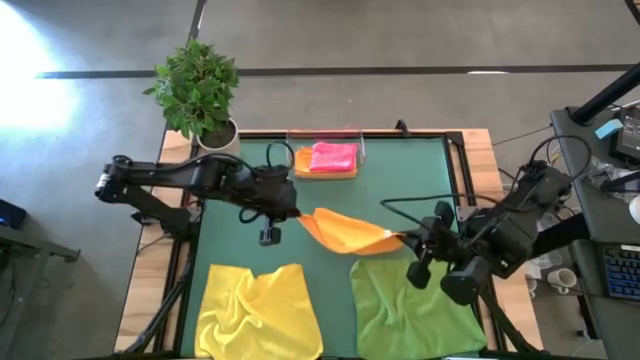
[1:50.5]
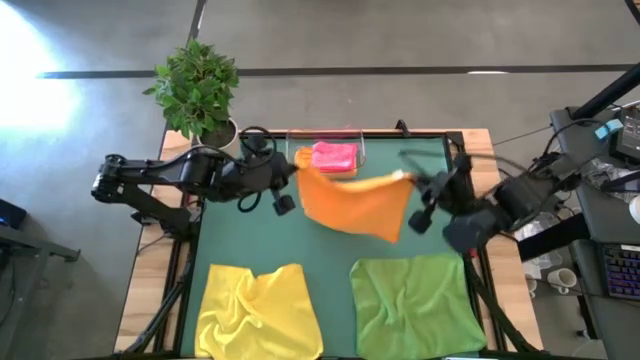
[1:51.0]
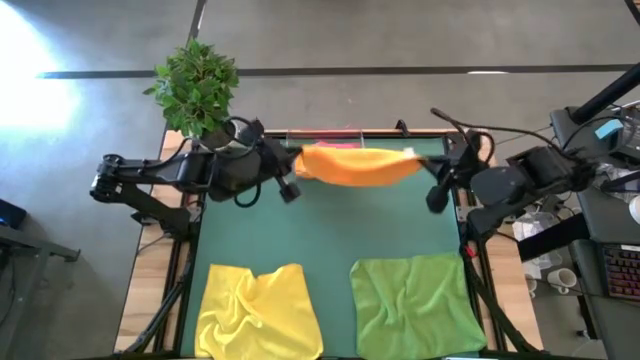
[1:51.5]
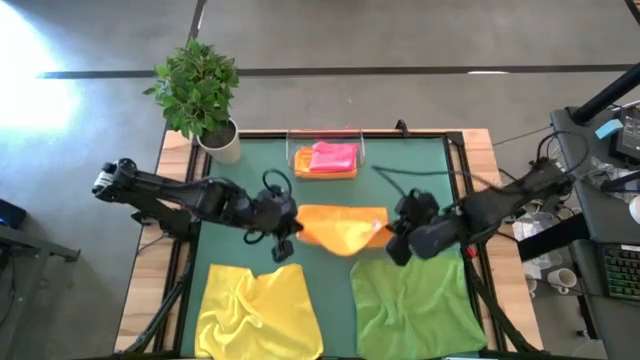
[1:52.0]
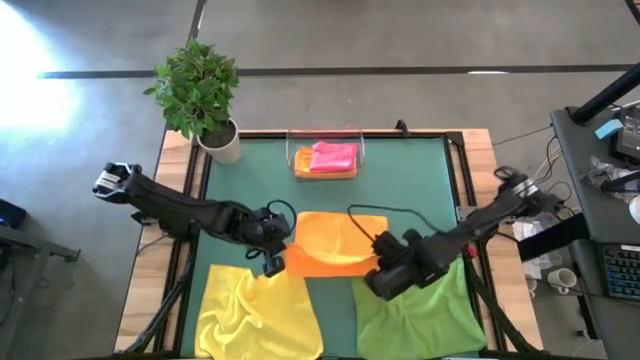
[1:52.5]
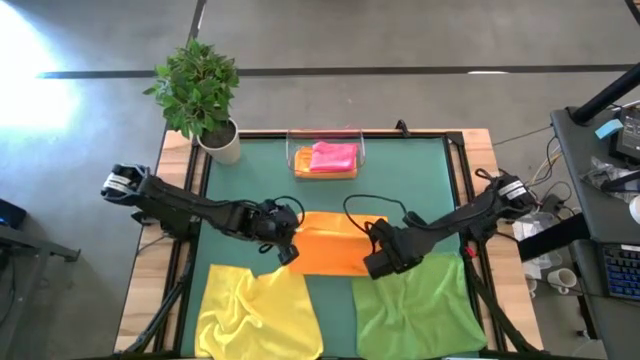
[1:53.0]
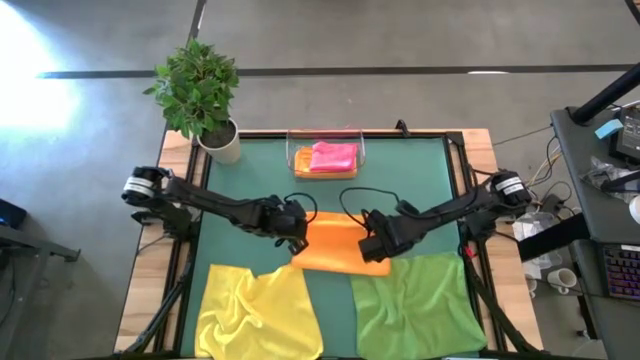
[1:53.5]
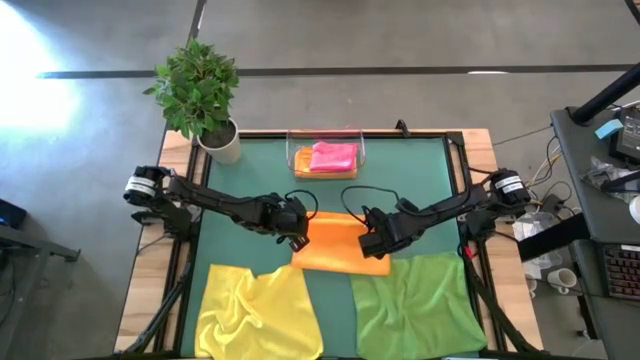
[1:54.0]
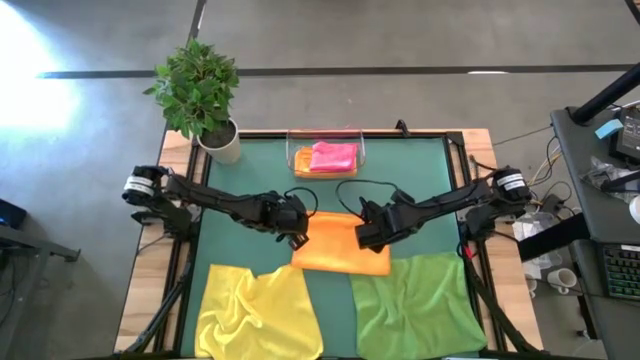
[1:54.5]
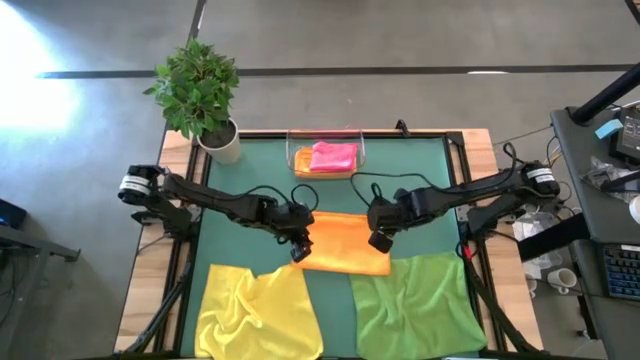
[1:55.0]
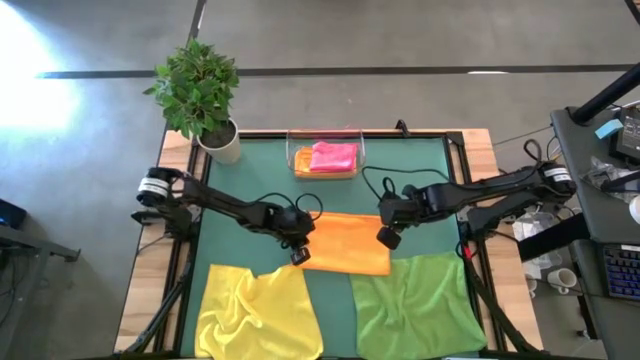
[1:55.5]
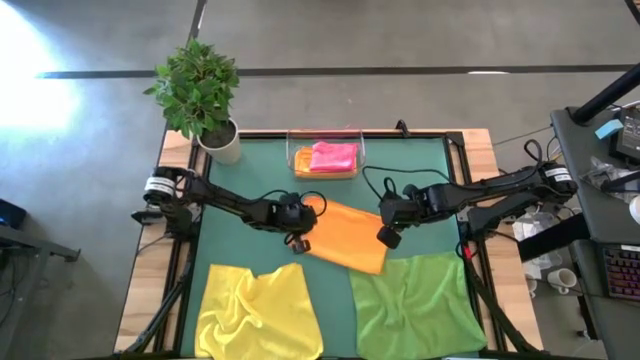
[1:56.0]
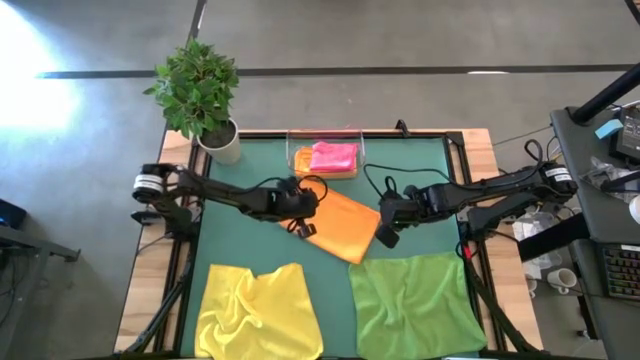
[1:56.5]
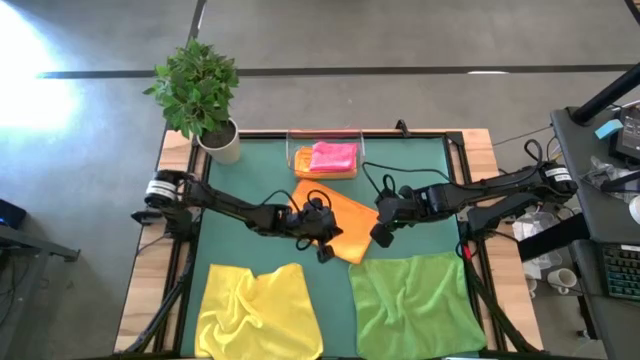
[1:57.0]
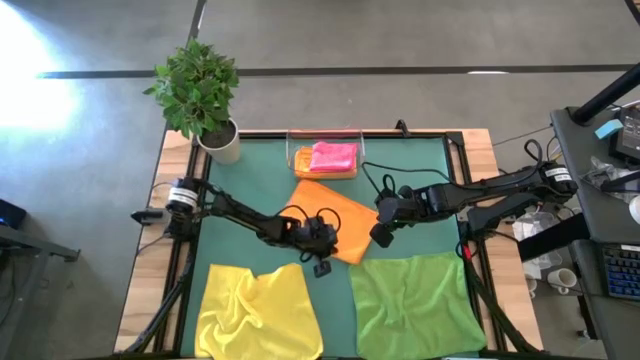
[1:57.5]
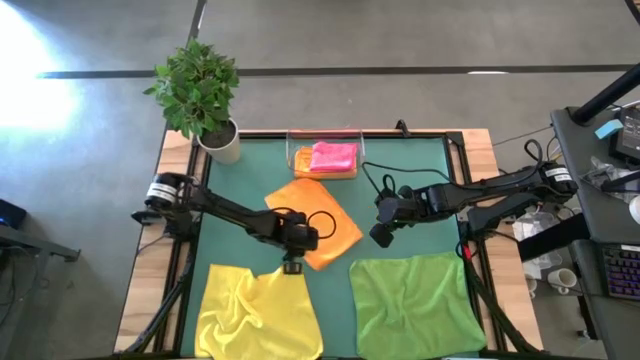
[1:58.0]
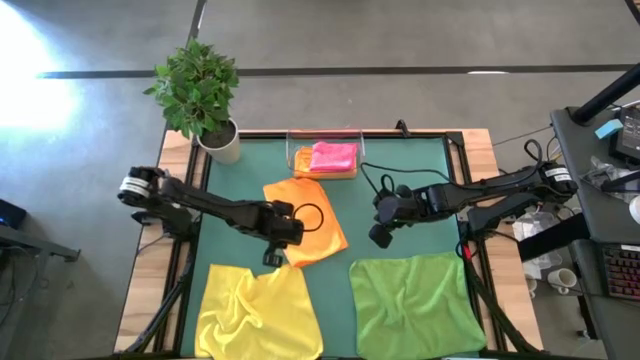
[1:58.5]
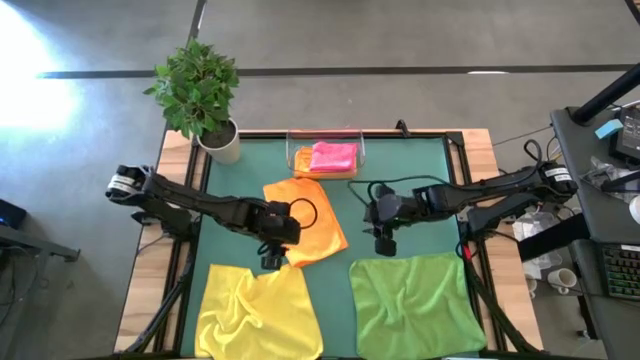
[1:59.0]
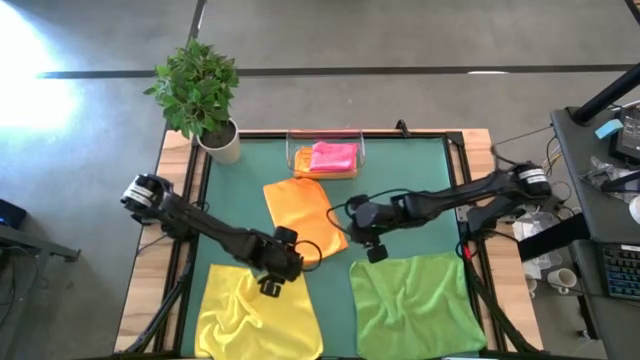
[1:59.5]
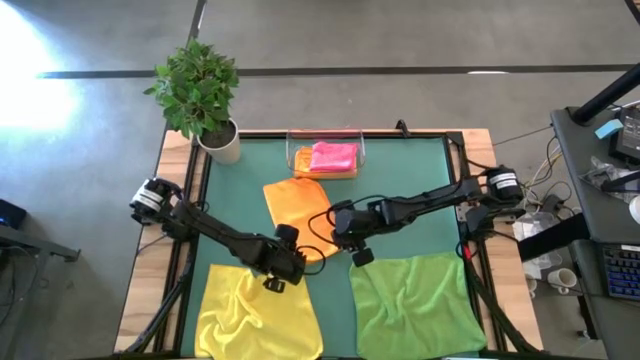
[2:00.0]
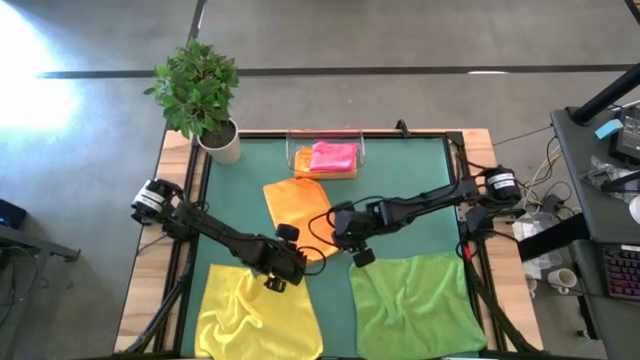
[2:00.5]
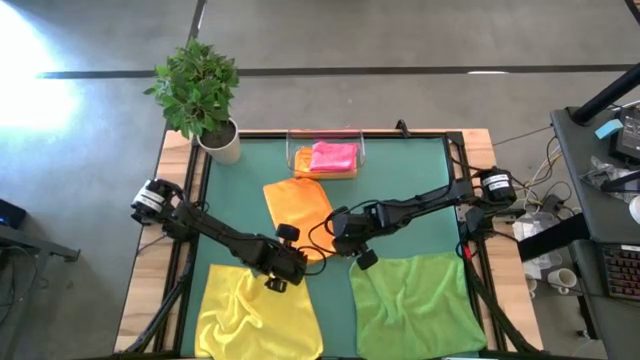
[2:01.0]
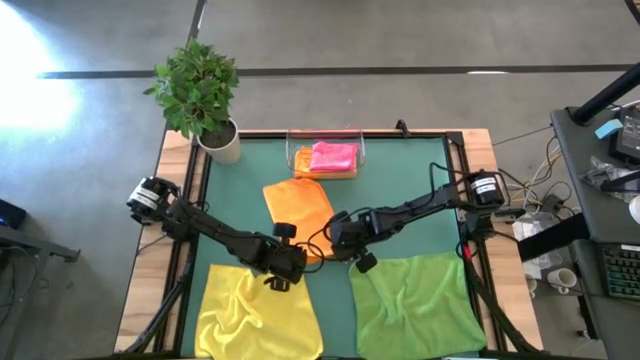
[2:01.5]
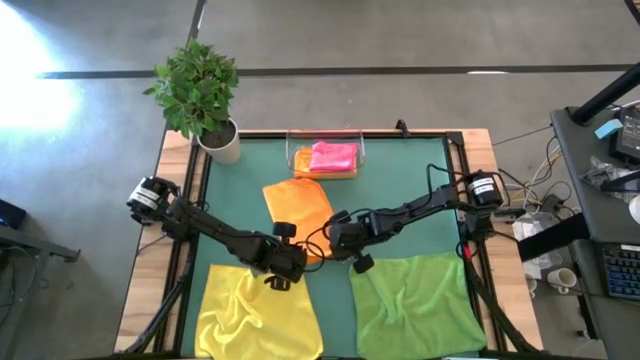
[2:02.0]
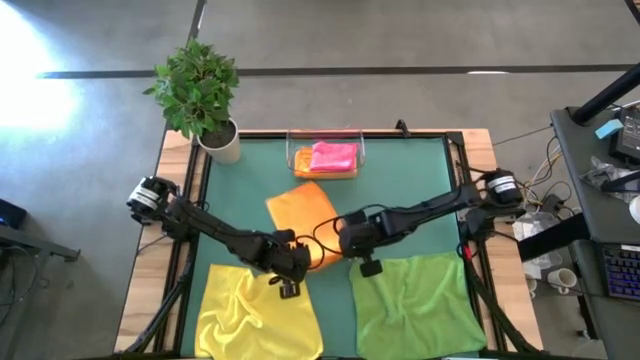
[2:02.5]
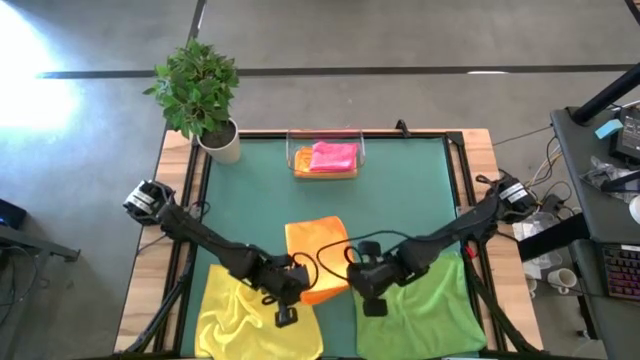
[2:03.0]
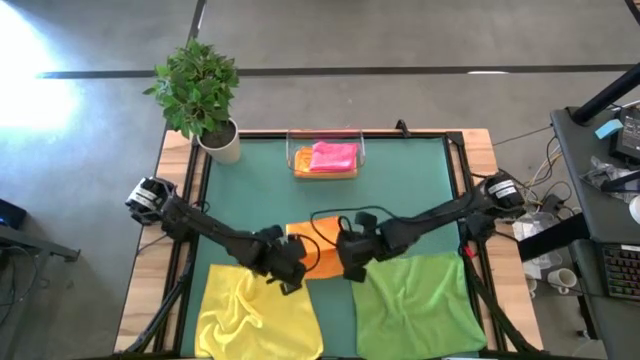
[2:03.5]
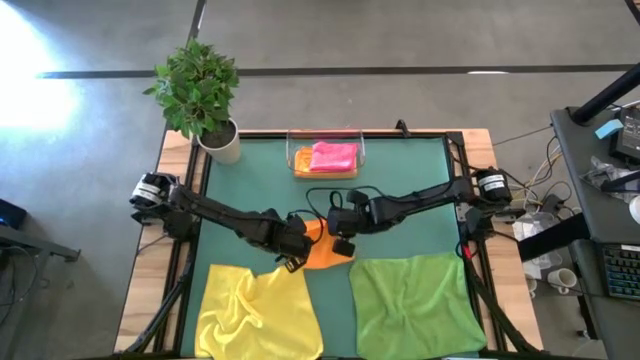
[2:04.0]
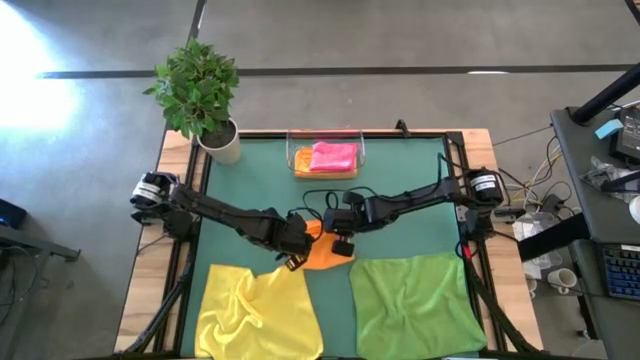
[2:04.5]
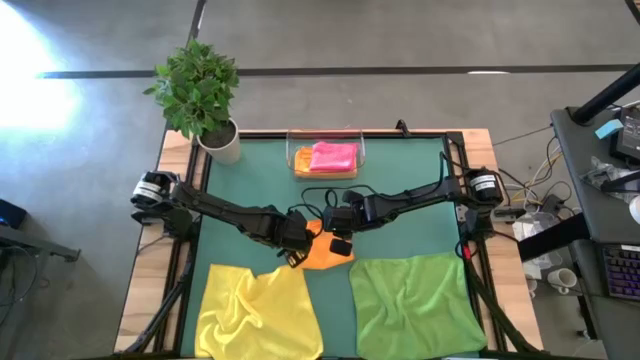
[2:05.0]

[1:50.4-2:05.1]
Task: Fold microfiber towels
Fold the orange microfiber cloth

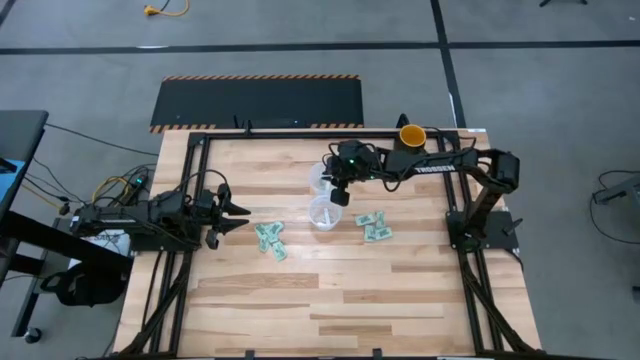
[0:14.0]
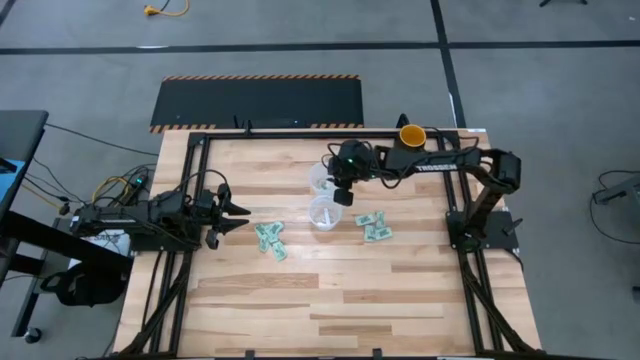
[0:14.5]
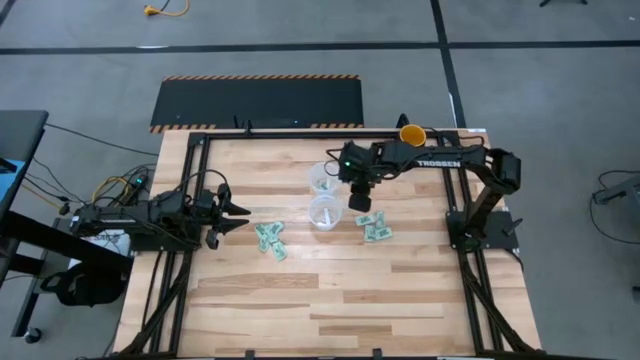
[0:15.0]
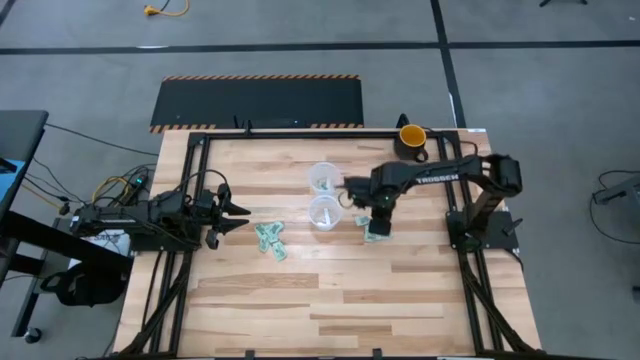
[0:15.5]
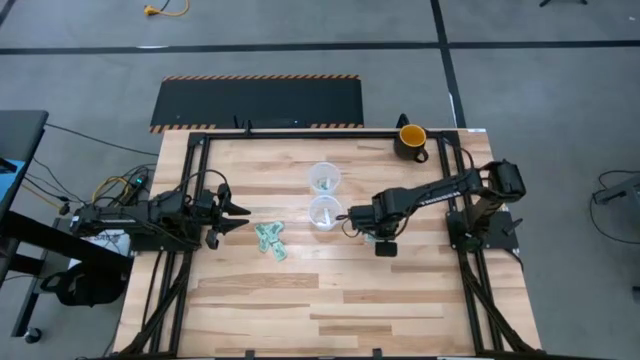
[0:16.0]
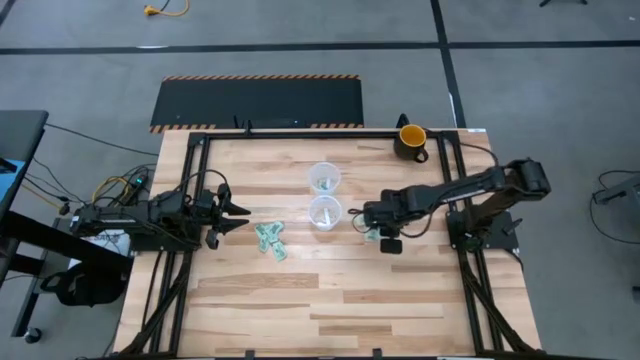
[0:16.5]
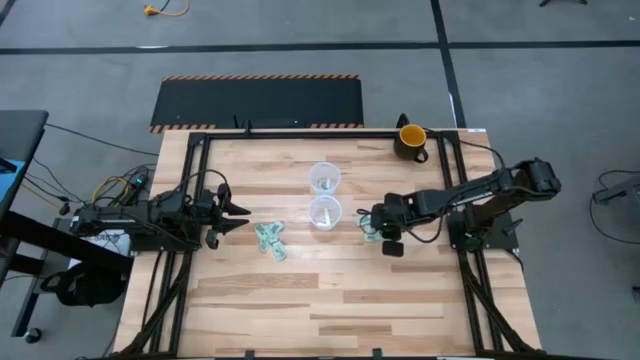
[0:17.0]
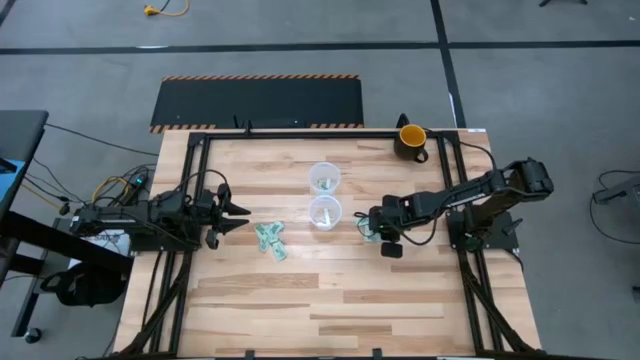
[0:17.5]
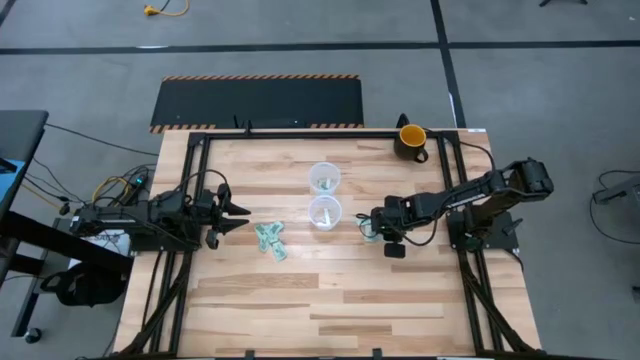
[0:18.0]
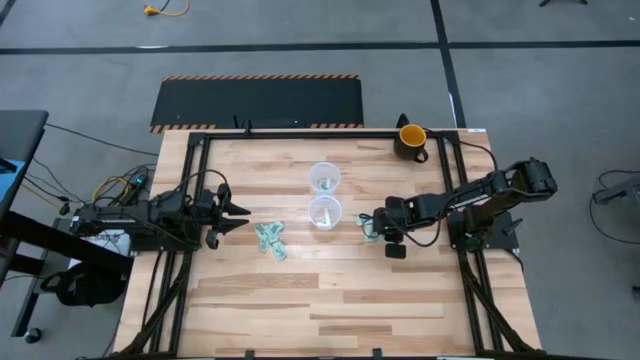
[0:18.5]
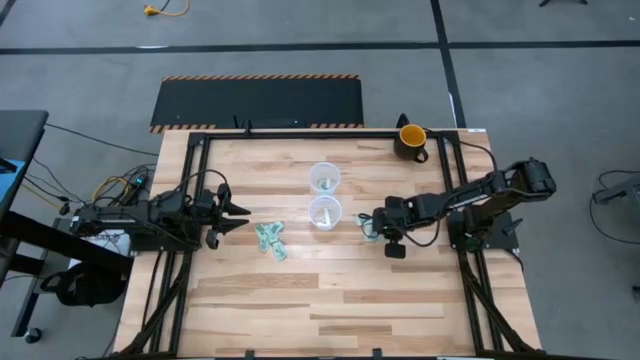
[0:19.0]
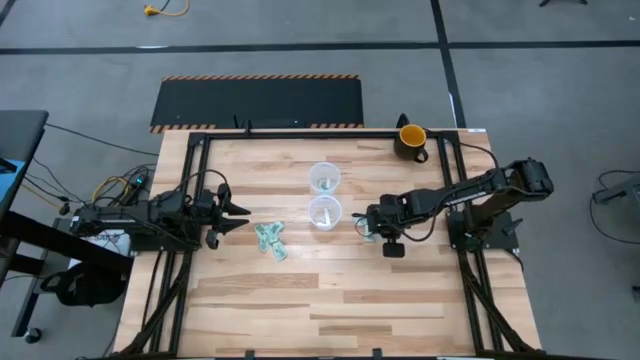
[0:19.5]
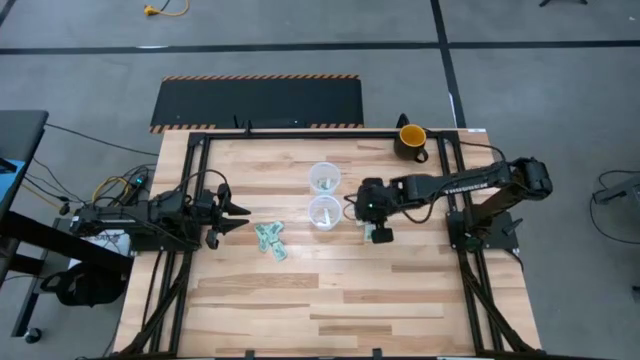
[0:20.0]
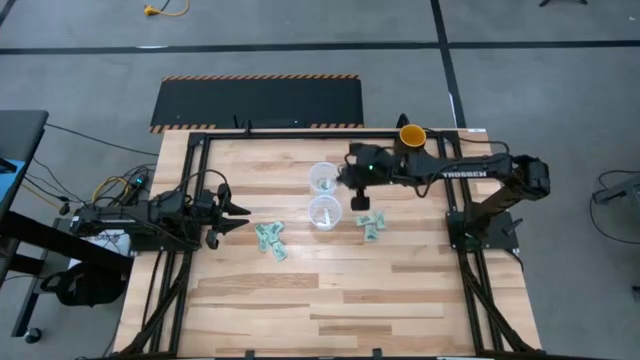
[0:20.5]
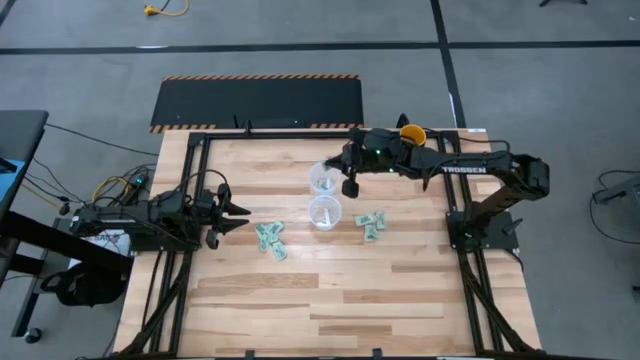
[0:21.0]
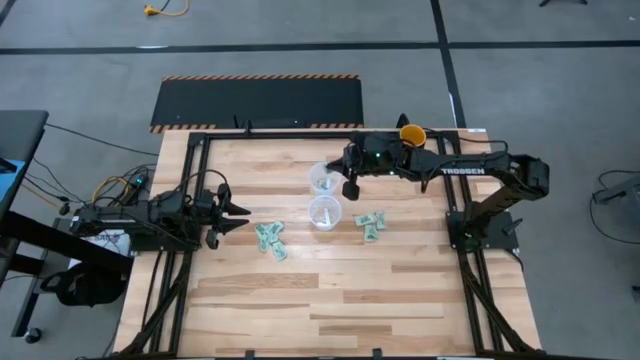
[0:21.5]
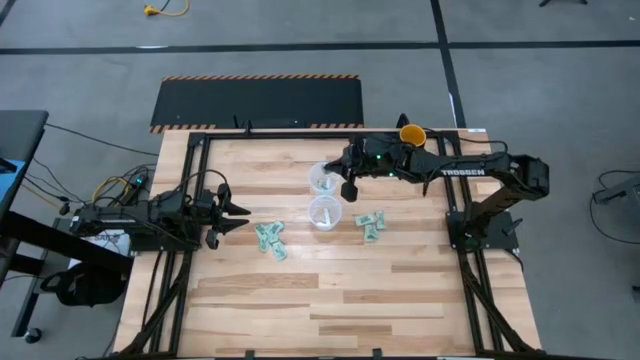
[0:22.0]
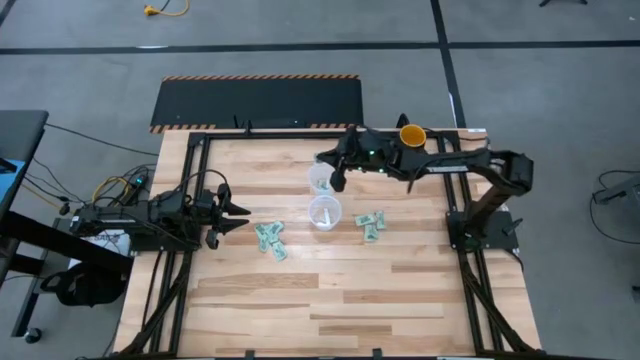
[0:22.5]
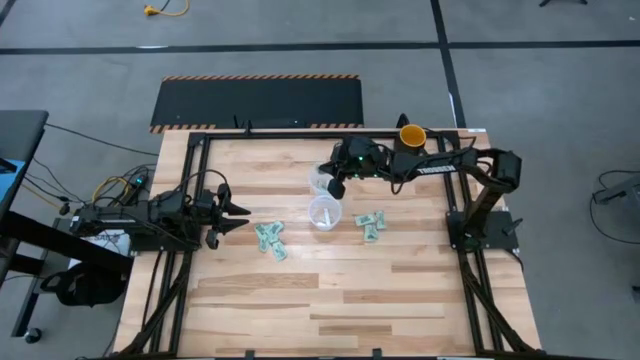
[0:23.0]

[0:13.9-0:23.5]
Task: Pick and place items into bin
Put the green stevia packet into the top transparent bin
